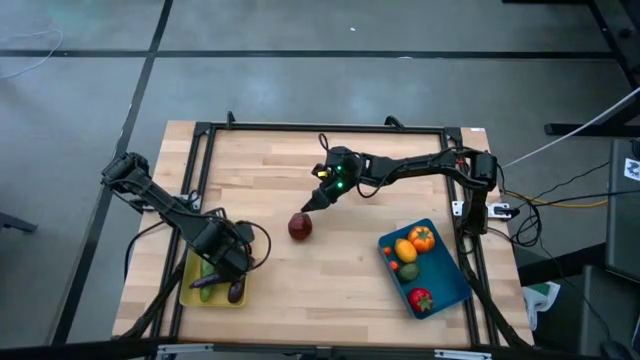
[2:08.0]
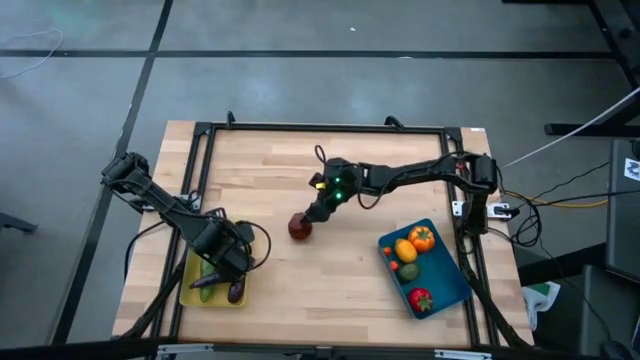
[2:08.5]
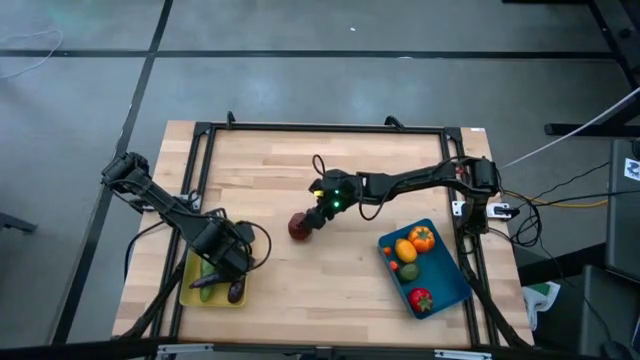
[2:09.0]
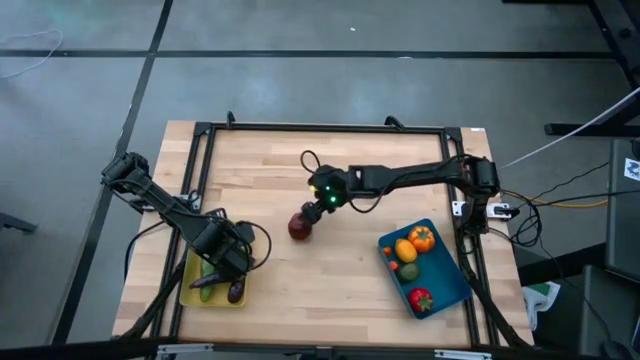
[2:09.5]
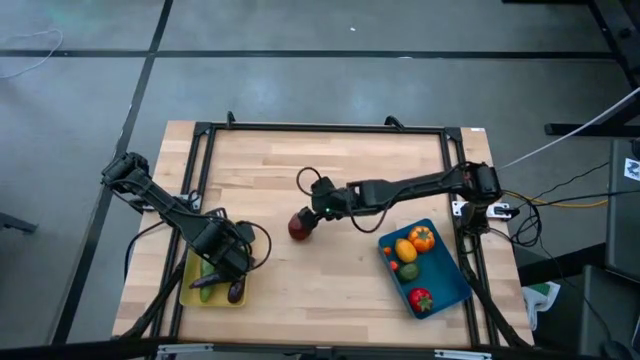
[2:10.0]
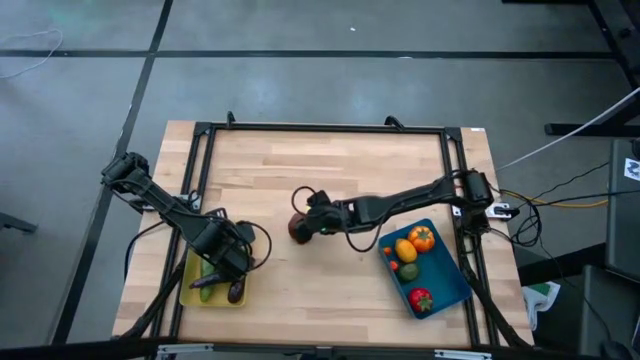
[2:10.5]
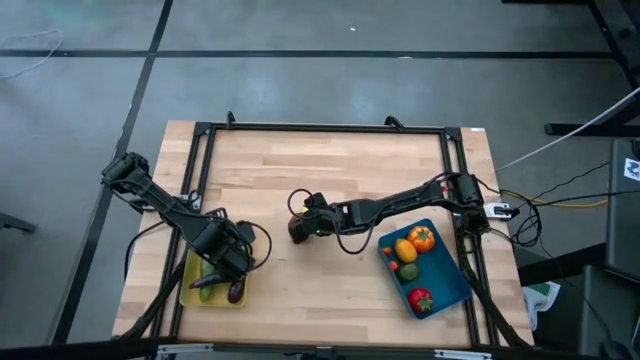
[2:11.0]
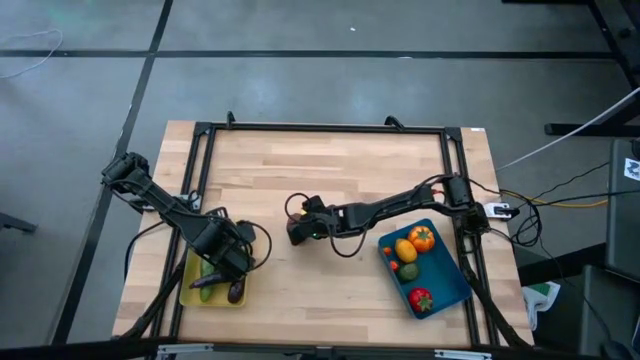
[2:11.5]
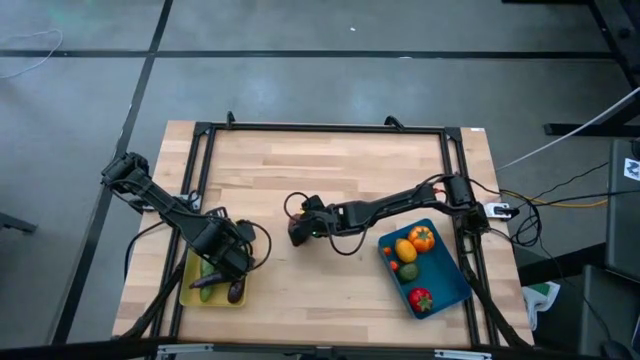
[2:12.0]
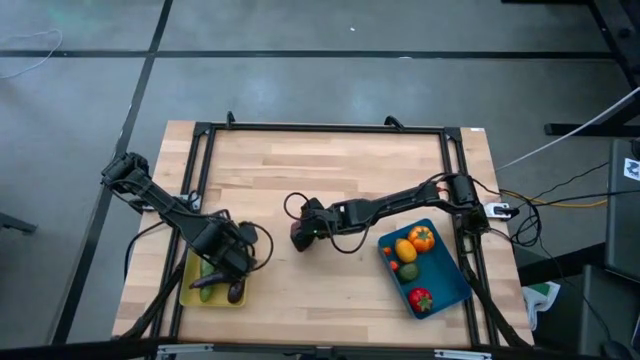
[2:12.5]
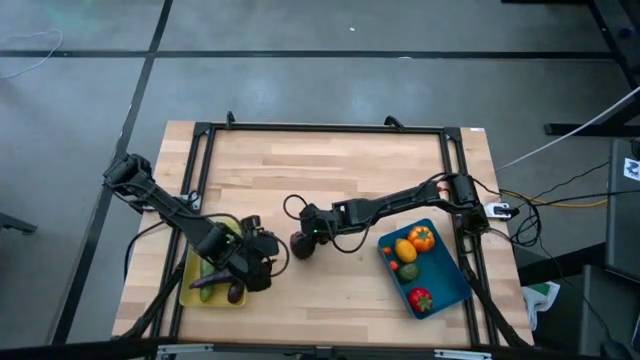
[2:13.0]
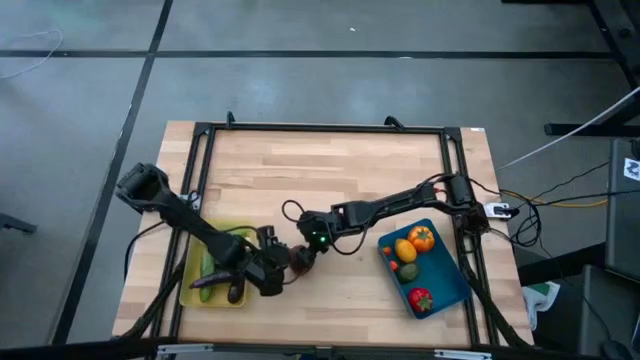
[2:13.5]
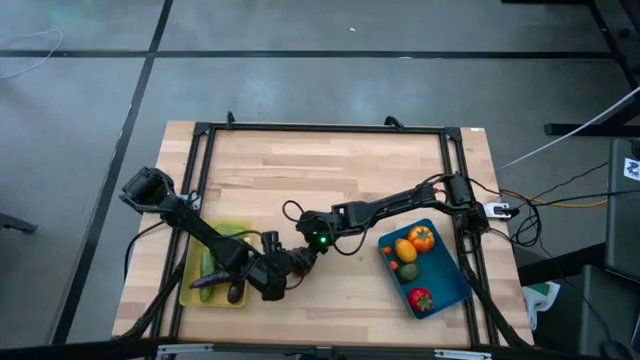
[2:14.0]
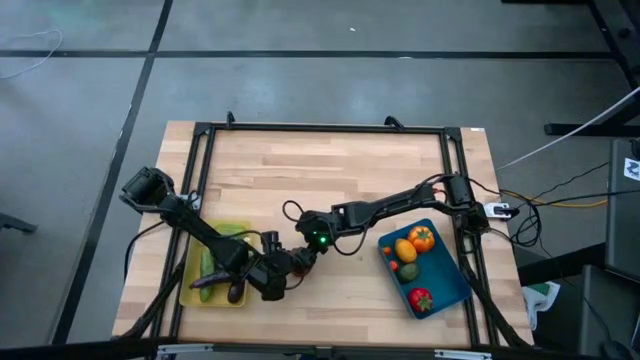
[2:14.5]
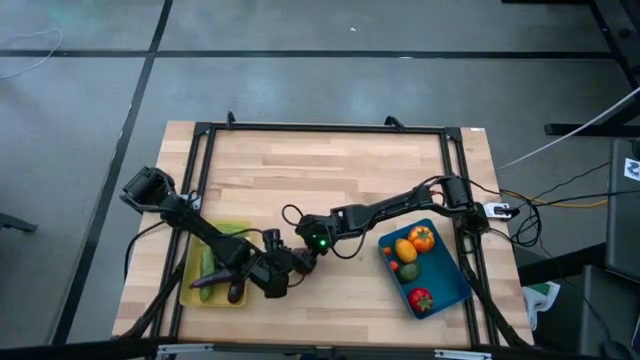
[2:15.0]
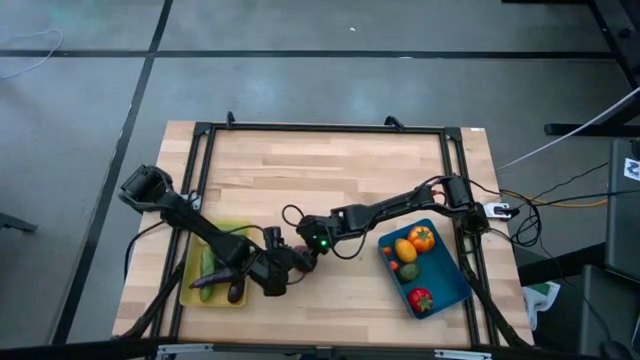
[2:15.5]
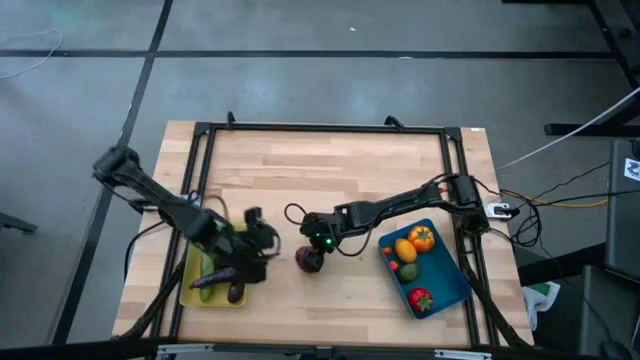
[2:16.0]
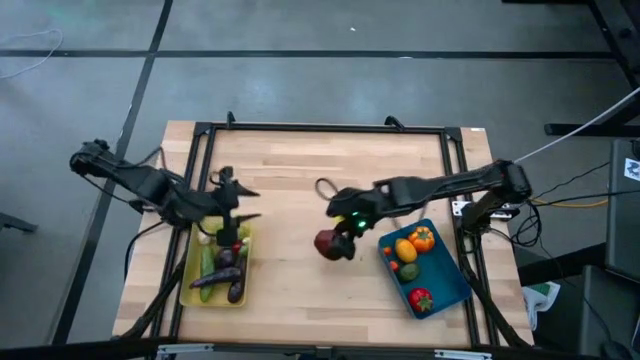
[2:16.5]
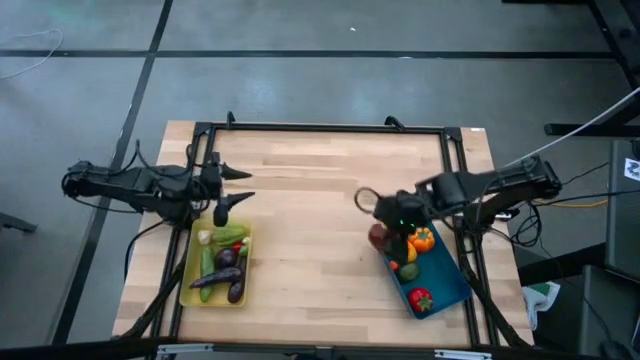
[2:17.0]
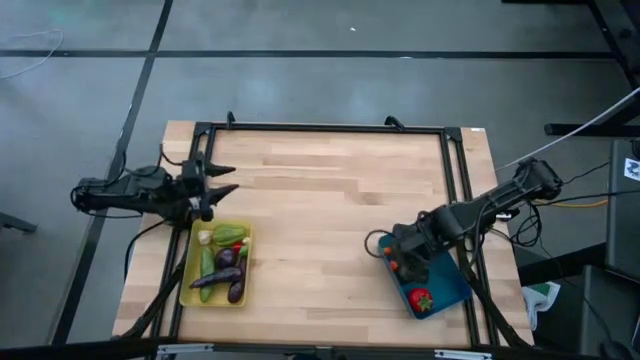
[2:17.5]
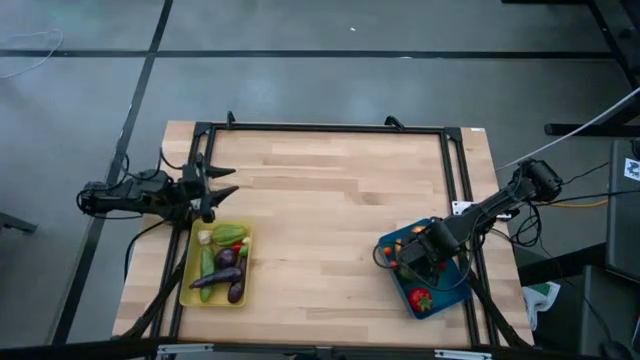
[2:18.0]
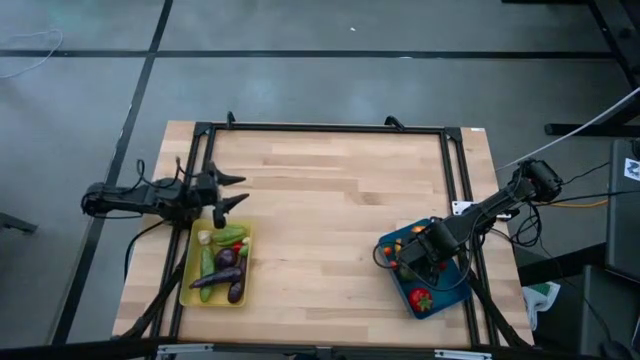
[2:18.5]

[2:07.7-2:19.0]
Task: Sort produce into baskets
Put the apple into the blue bin

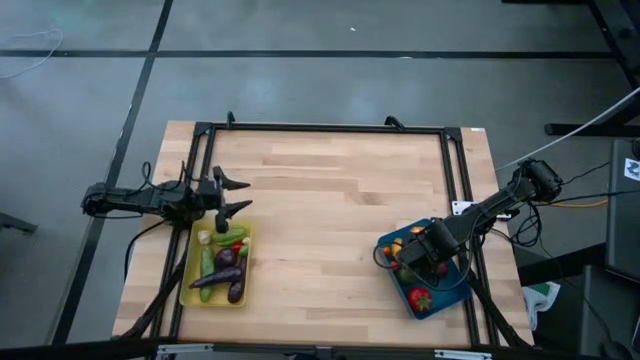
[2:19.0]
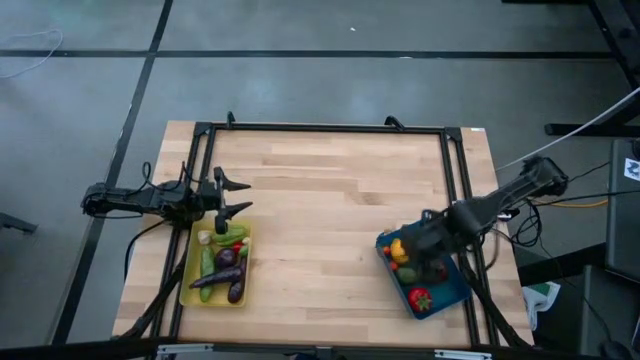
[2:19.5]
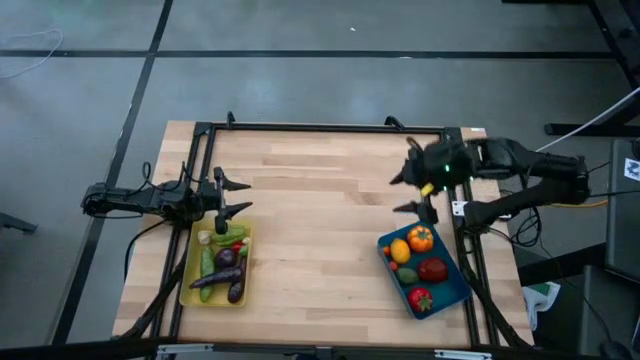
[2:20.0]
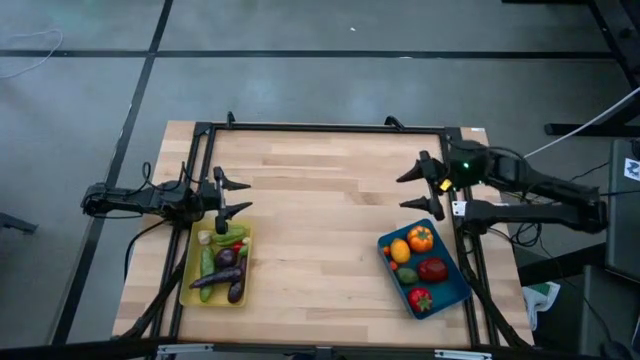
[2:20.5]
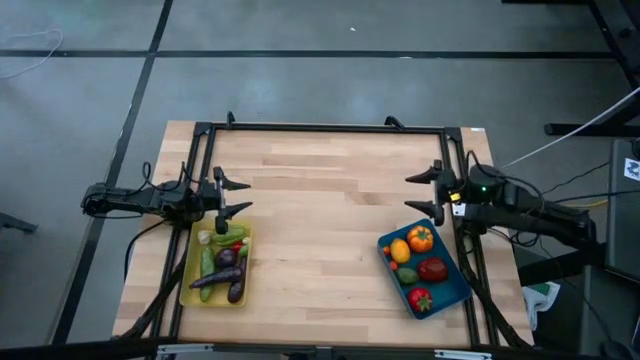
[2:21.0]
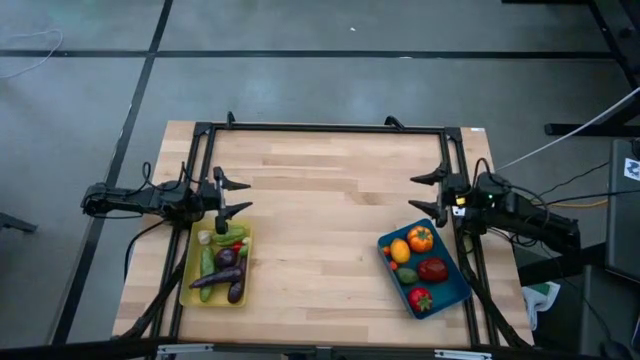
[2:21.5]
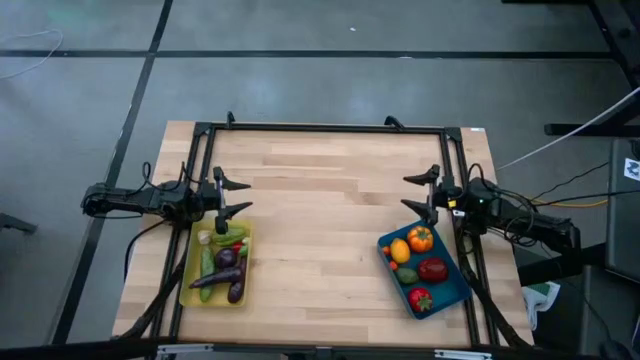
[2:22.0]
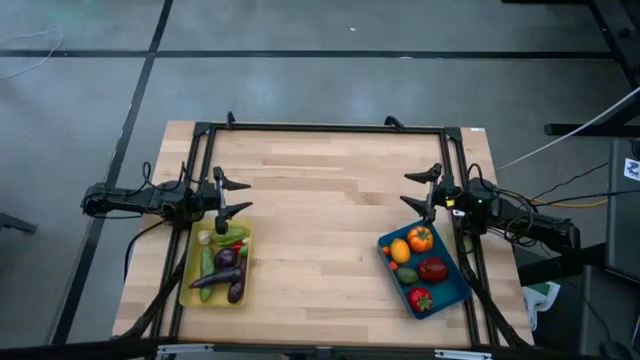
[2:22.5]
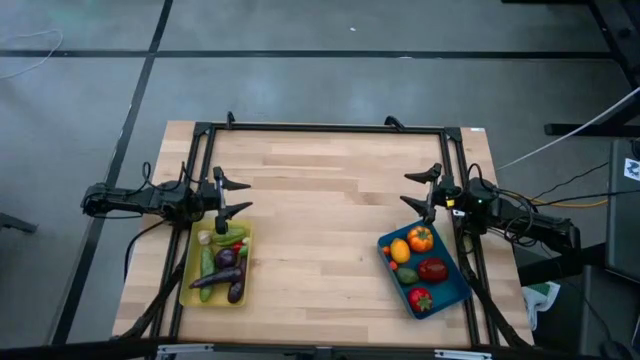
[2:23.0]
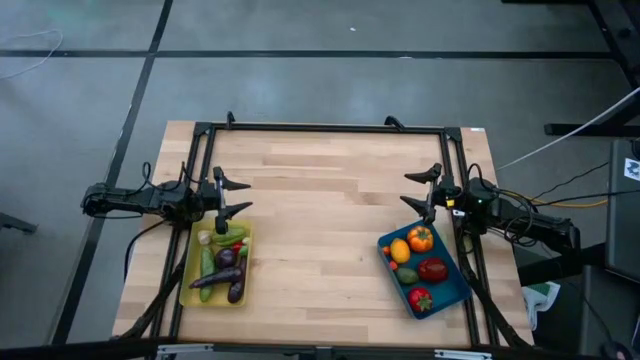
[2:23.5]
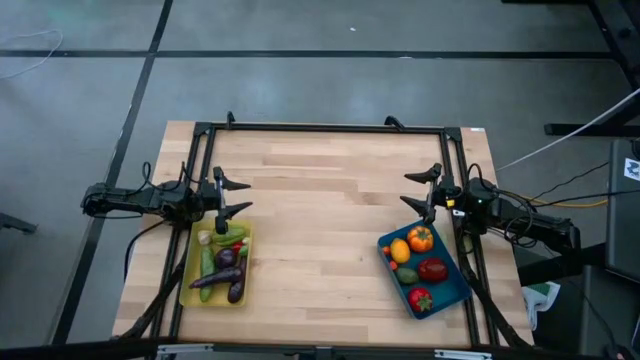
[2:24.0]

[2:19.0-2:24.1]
Return to Home Position

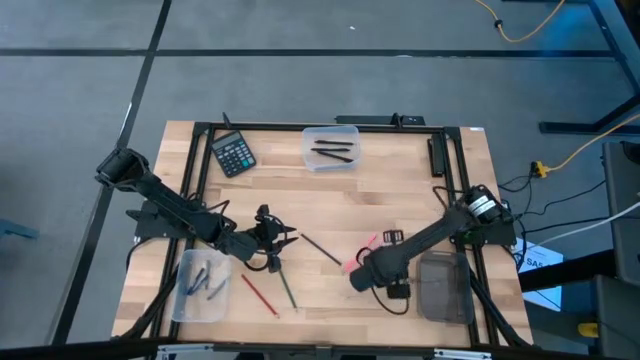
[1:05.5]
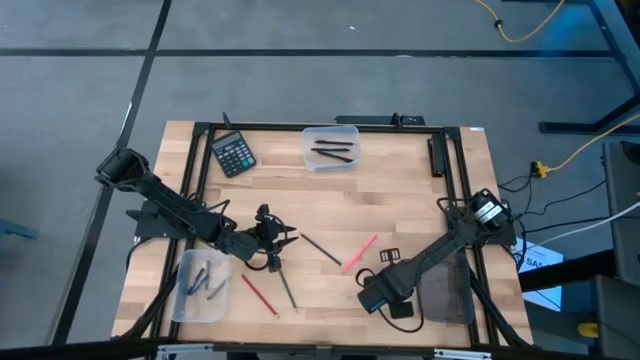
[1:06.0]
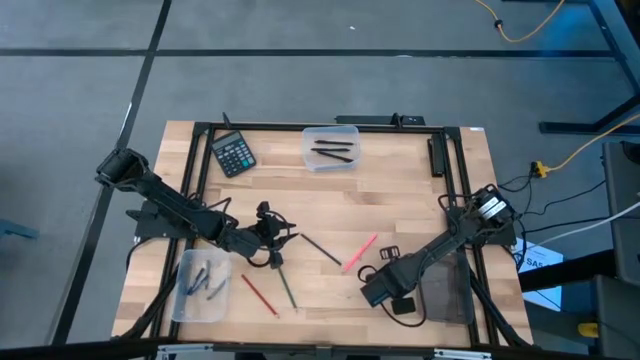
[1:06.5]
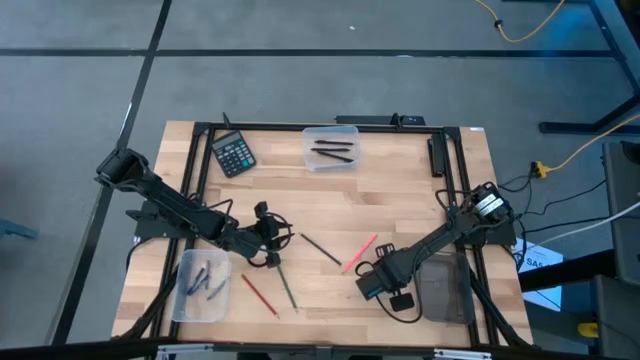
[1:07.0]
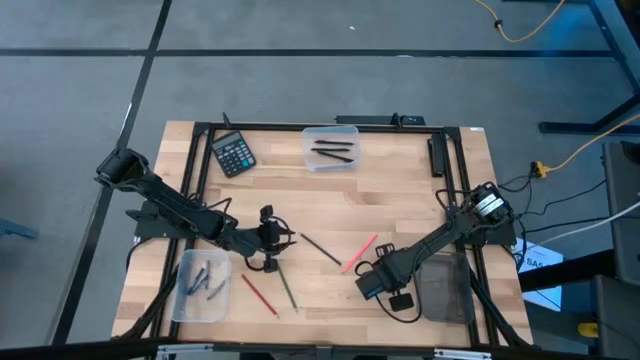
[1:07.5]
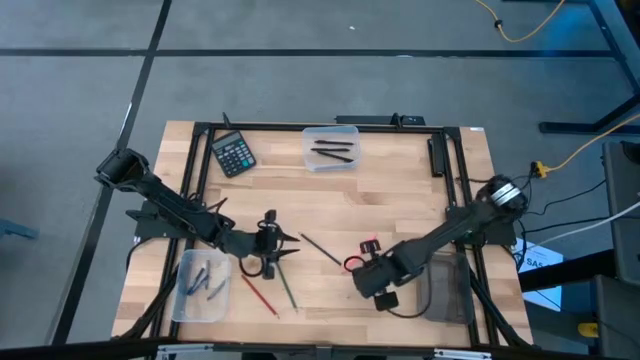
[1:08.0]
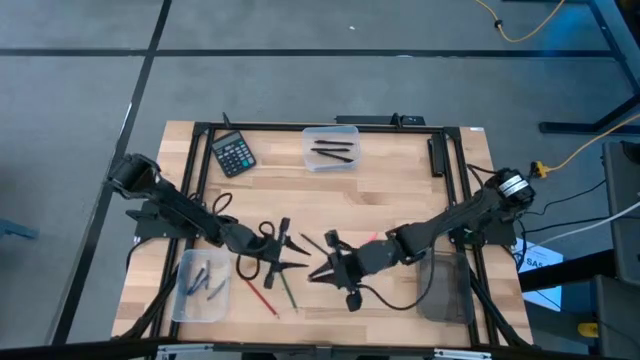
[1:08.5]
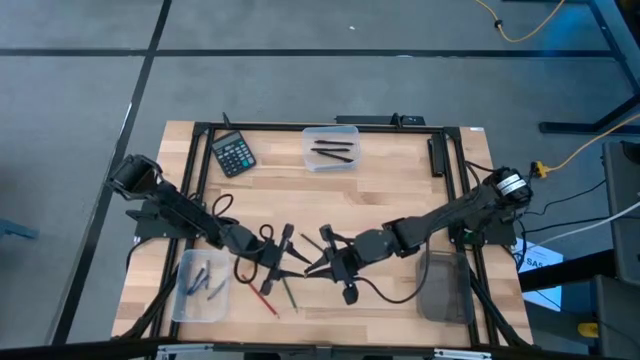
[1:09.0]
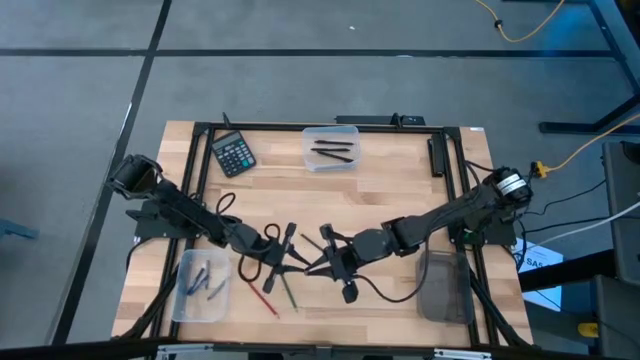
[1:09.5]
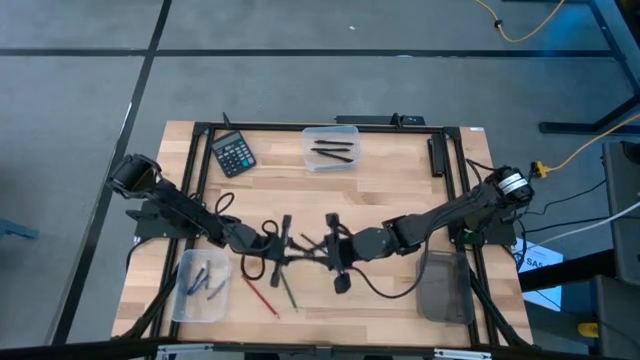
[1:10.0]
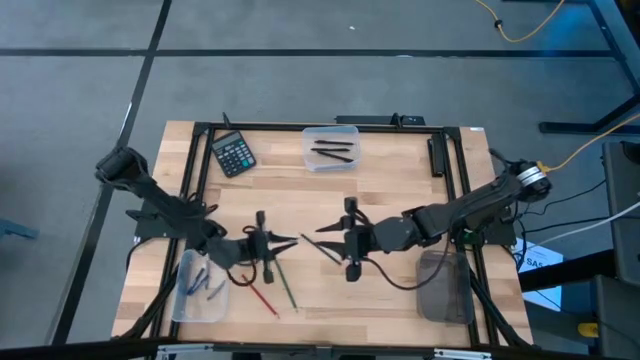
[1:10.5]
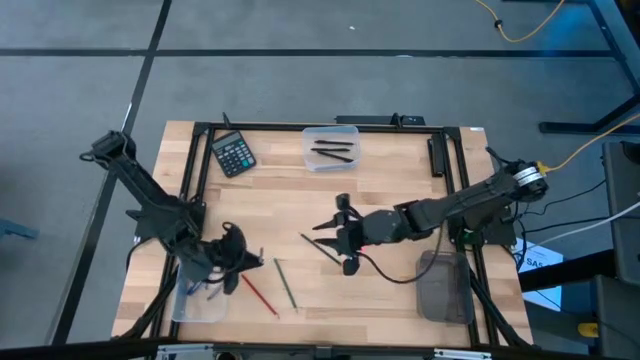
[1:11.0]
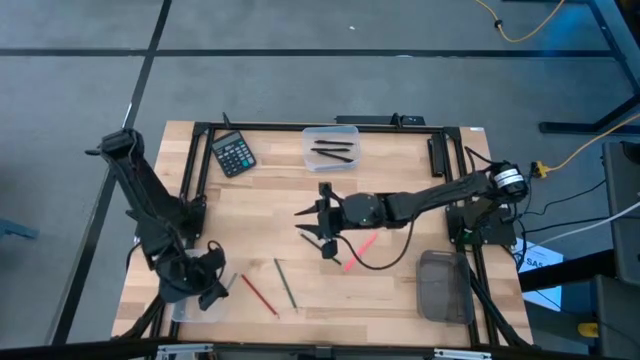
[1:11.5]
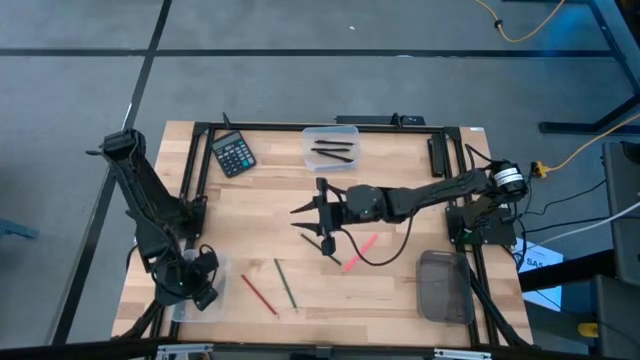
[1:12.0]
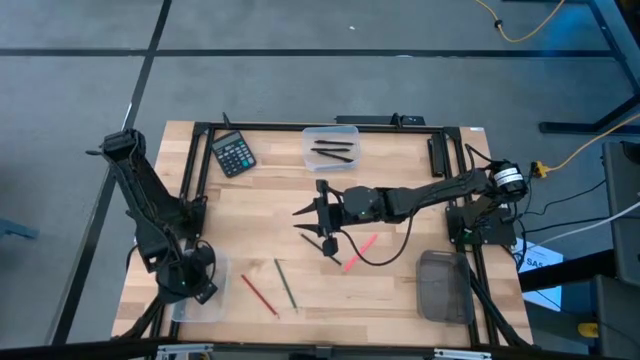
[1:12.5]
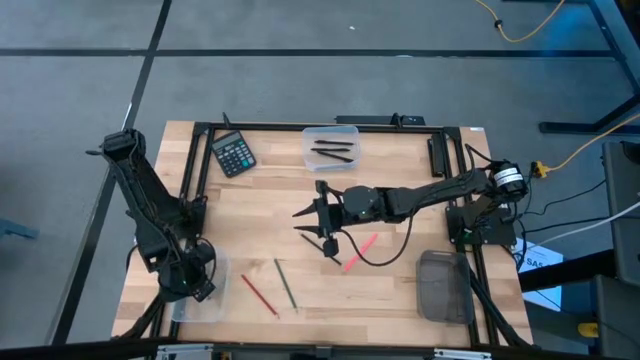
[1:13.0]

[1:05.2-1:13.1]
Task: Sort crayons/erasers/pens/pencils in bins
Put the gray crayon into the bottom transparent bin
